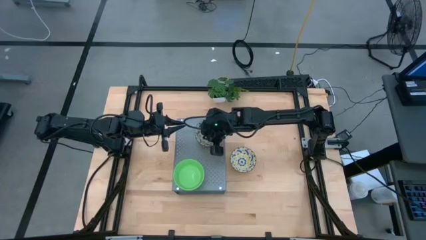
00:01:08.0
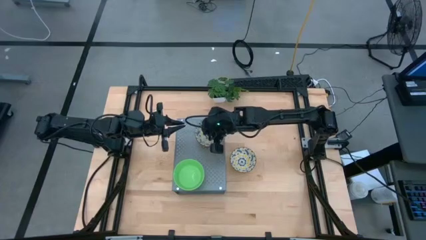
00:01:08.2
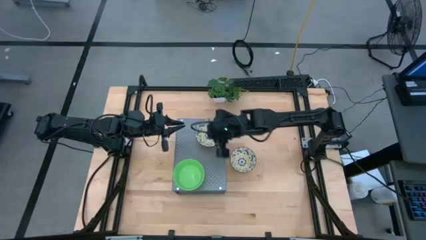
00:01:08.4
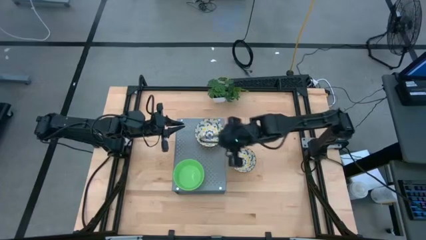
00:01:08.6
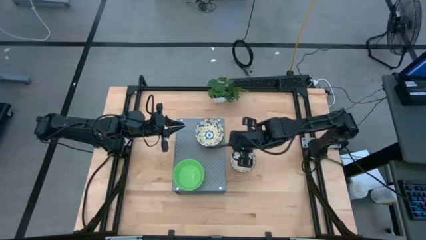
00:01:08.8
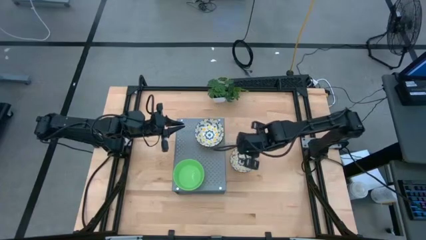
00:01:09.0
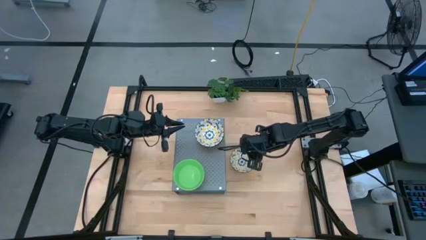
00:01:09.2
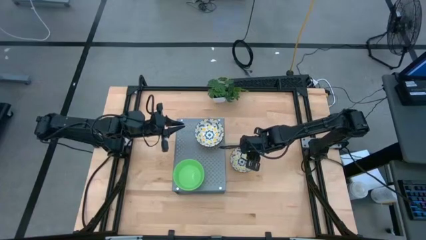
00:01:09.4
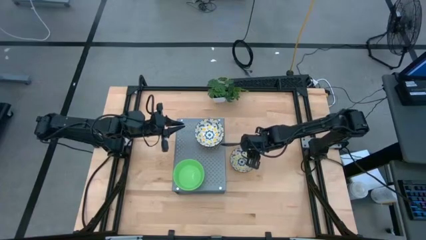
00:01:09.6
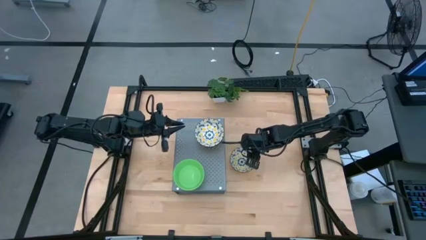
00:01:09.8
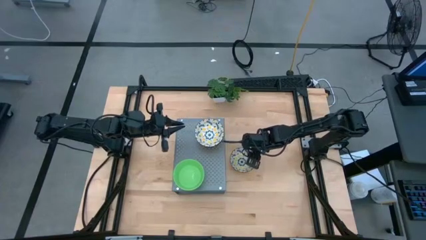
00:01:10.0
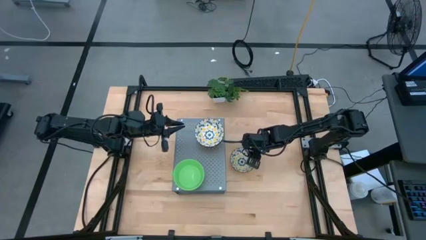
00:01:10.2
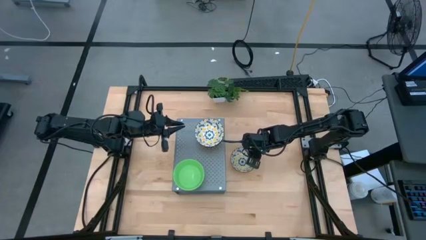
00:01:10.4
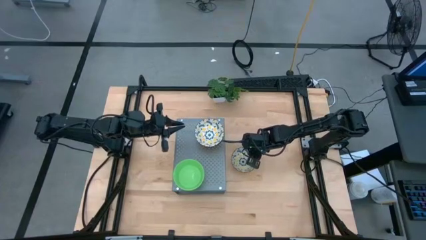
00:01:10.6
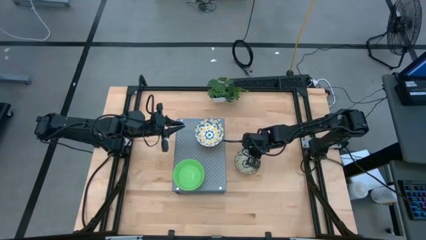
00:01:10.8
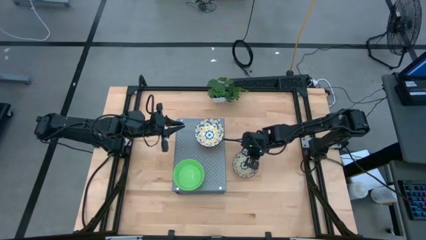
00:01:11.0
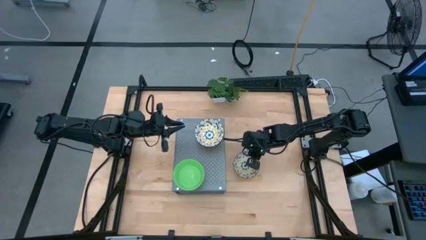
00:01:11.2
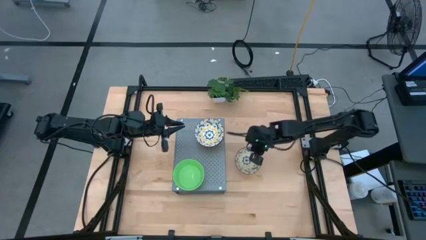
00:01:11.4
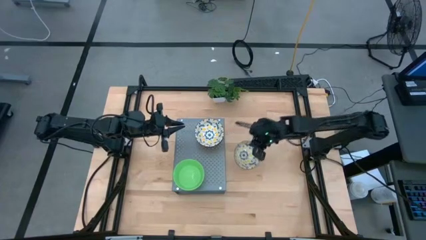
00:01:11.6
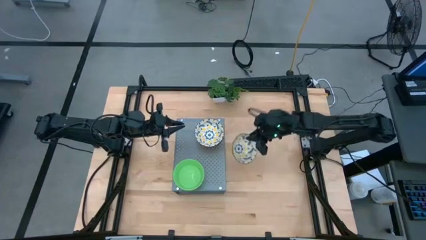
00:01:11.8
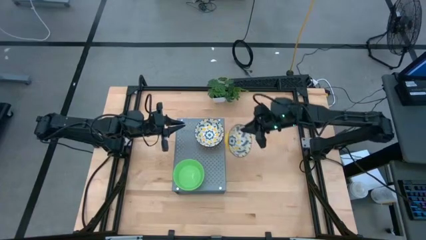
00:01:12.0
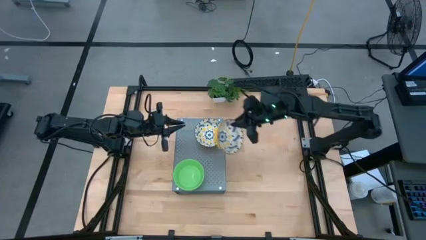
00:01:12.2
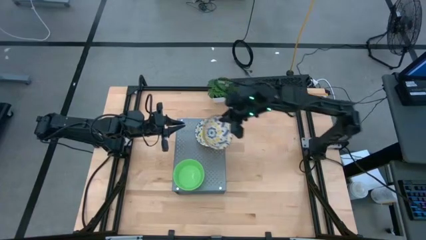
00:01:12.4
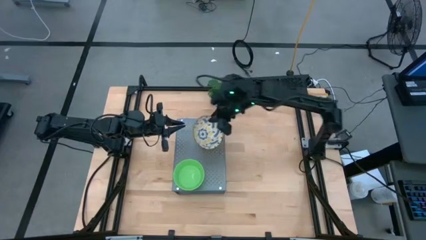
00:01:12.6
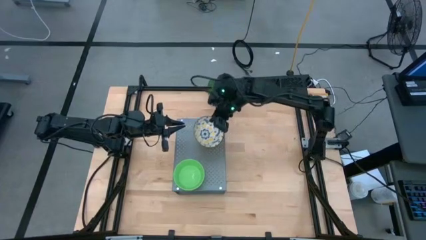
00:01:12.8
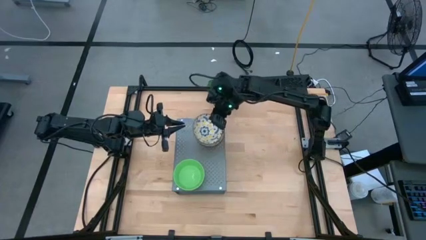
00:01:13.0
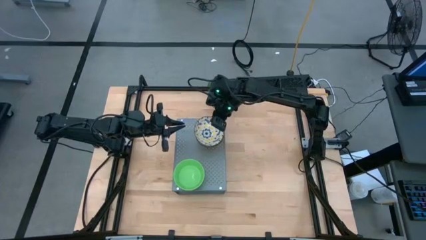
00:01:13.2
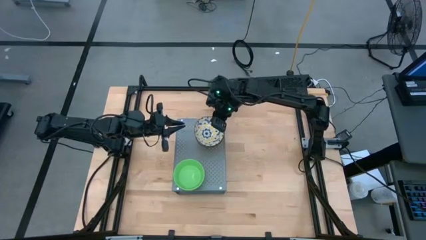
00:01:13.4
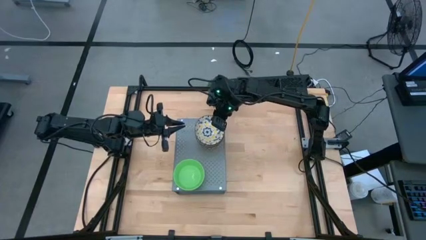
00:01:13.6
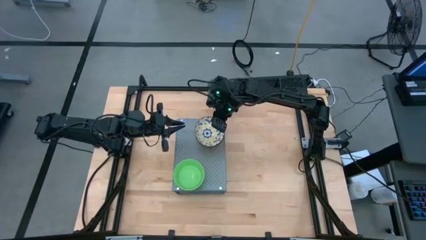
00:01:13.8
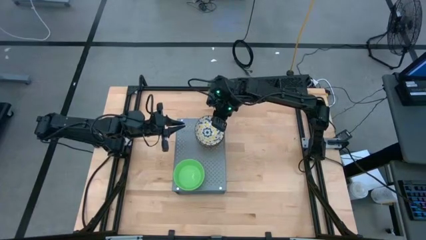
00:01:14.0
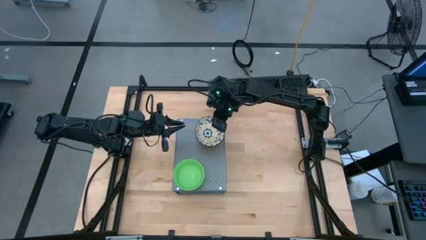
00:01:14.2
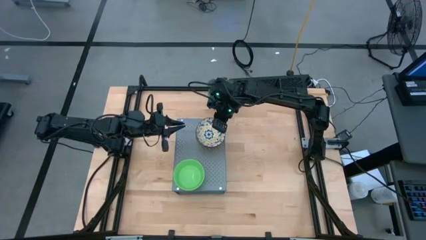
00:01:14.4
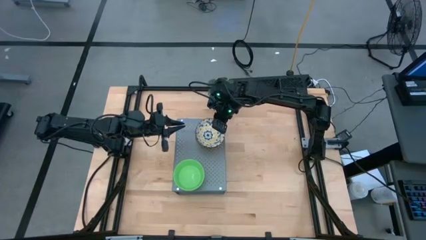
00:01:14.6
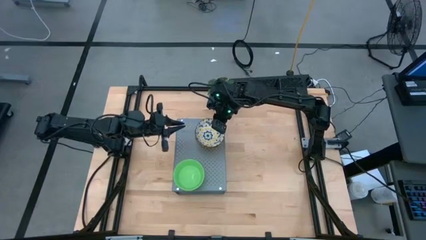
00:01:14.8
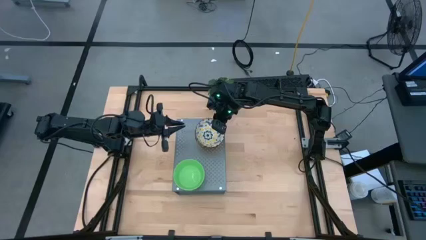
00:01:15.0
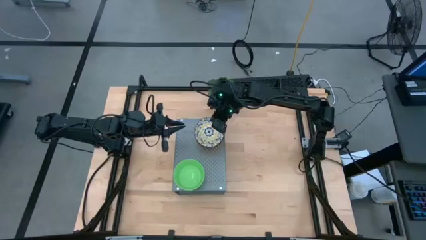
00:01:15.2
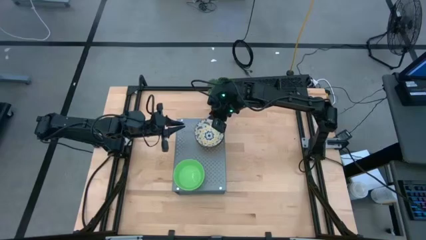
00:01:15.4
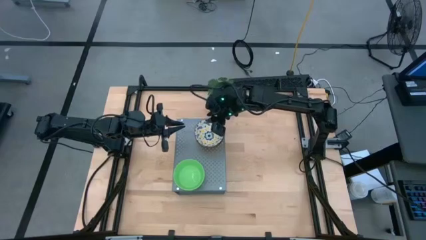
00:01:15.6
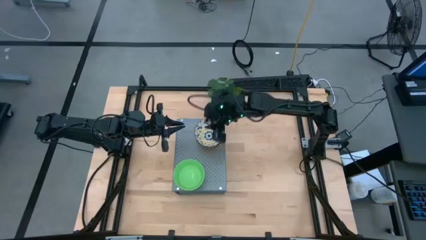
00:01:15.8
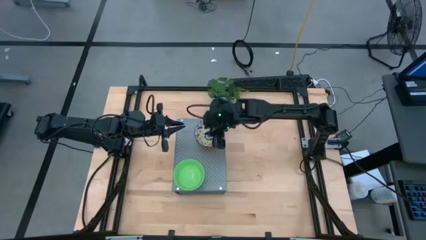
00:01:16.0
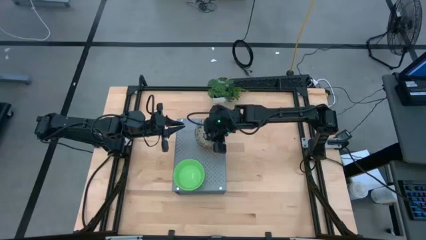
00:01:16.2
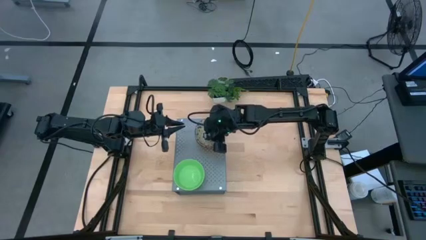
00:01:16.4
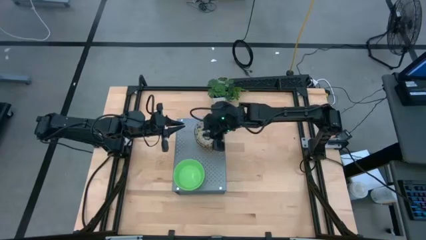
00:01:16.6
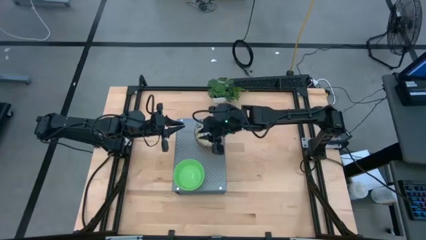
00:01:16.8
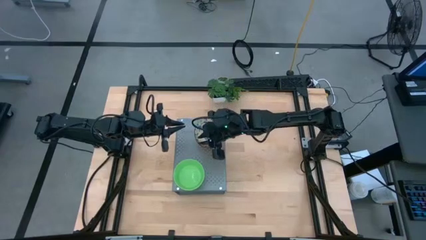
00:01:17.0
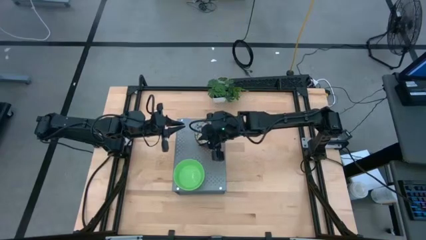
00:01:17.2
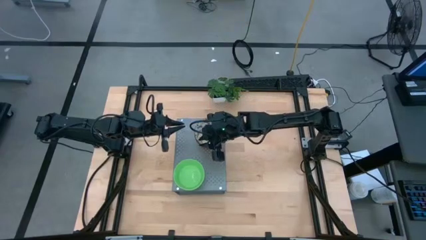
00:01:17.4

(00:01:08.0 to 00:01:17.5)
Task: Pick & Place Mini bowls
Stack the white patterned bowl on the white patterned bowls on the shelf

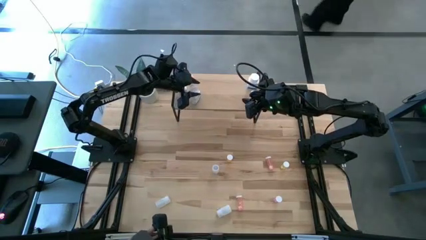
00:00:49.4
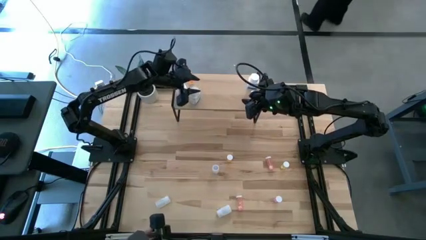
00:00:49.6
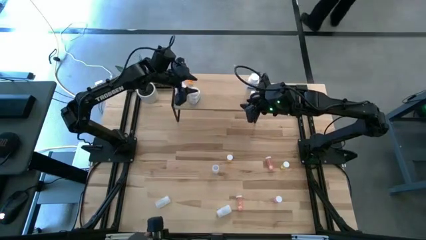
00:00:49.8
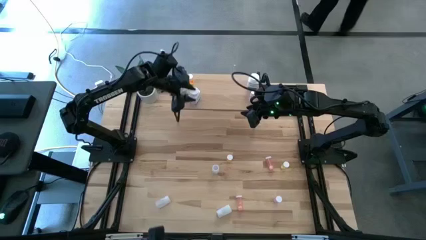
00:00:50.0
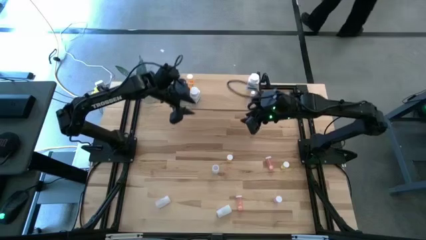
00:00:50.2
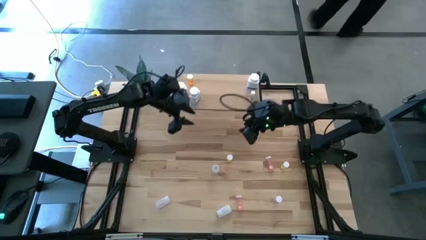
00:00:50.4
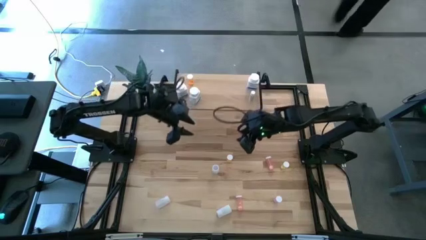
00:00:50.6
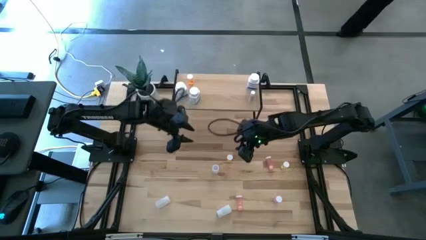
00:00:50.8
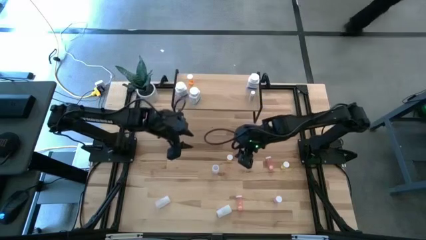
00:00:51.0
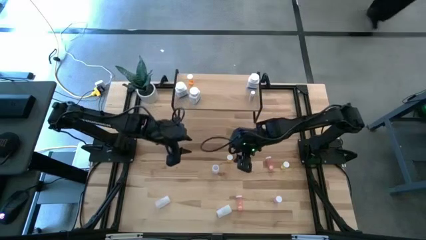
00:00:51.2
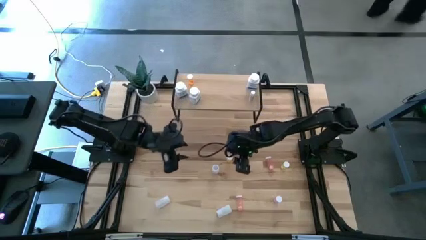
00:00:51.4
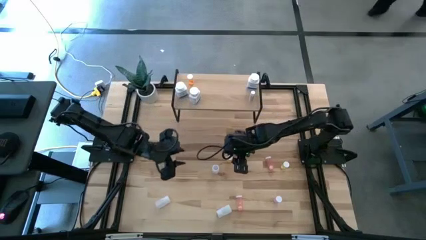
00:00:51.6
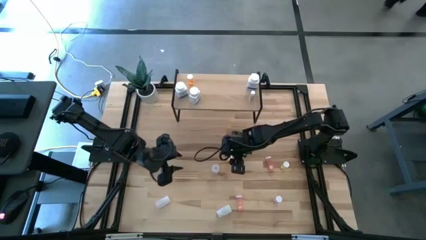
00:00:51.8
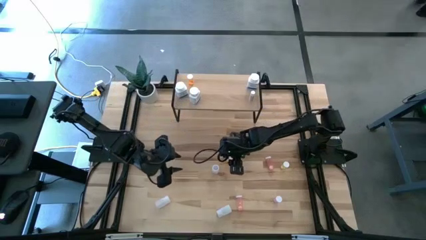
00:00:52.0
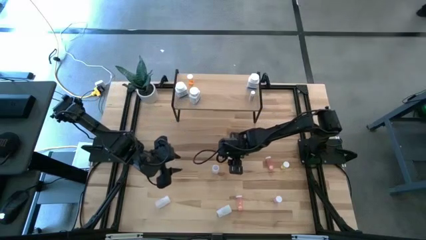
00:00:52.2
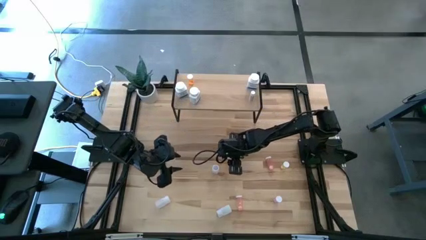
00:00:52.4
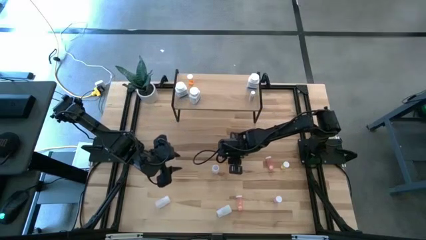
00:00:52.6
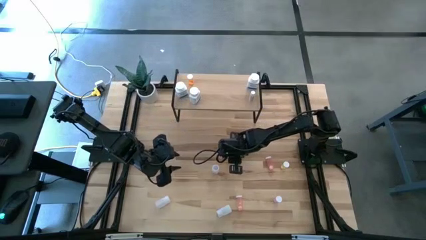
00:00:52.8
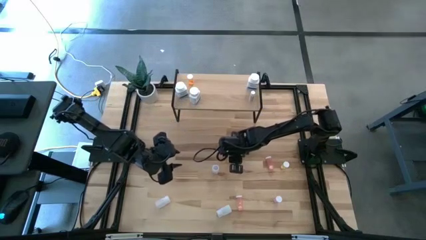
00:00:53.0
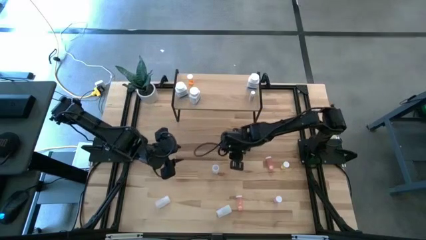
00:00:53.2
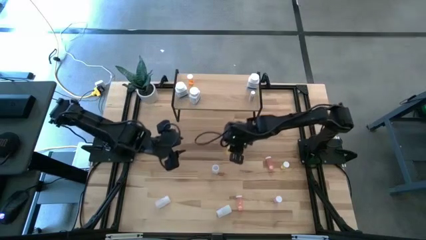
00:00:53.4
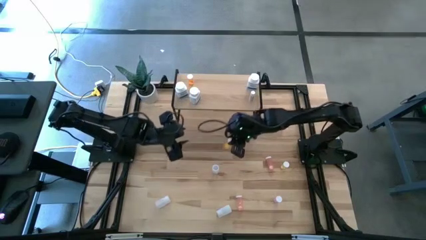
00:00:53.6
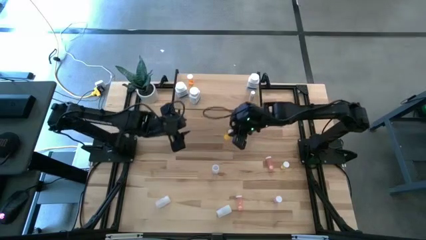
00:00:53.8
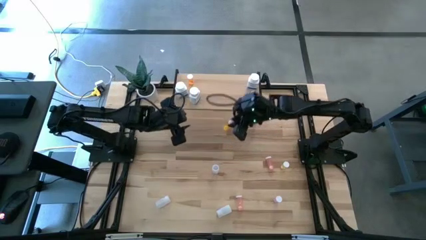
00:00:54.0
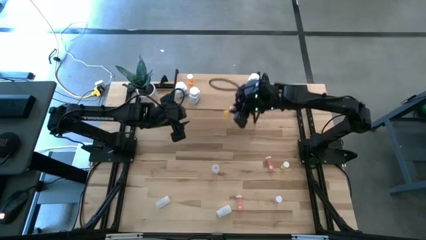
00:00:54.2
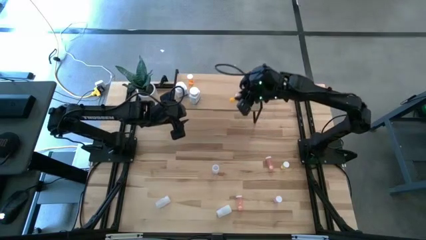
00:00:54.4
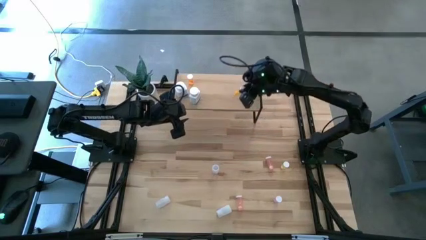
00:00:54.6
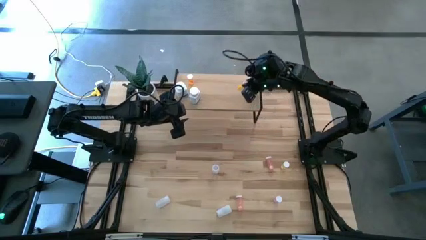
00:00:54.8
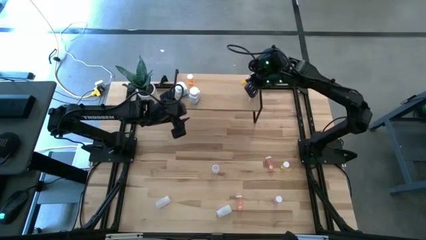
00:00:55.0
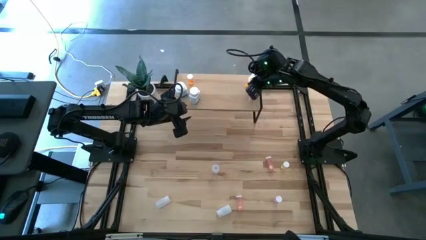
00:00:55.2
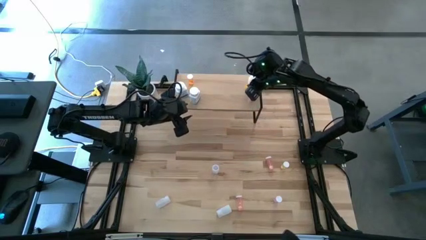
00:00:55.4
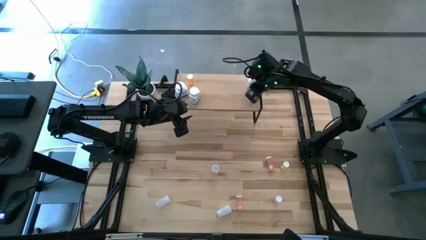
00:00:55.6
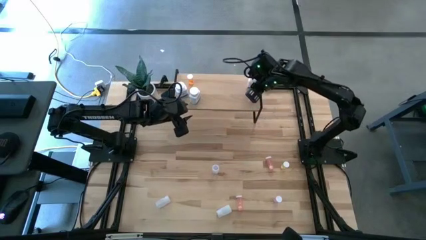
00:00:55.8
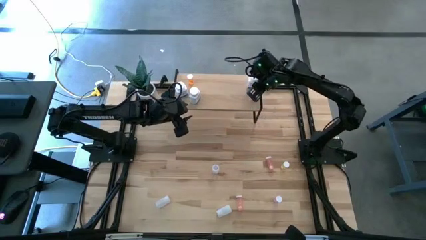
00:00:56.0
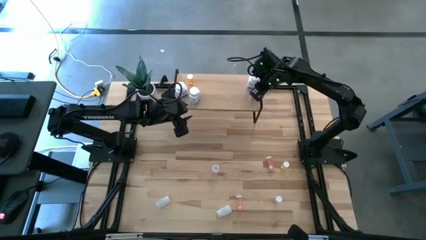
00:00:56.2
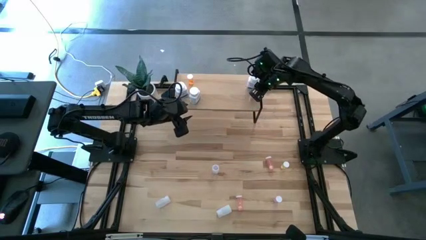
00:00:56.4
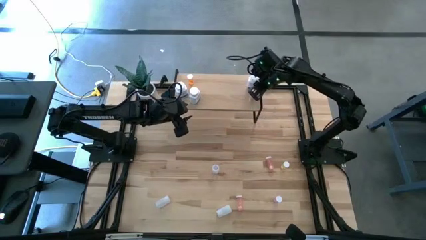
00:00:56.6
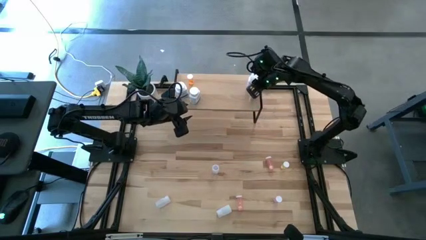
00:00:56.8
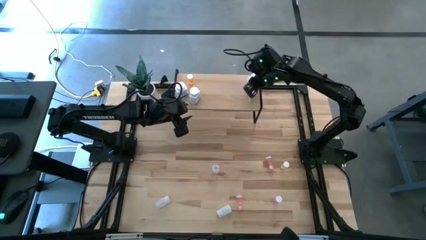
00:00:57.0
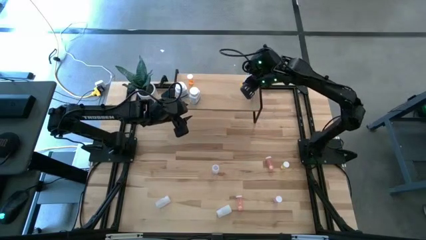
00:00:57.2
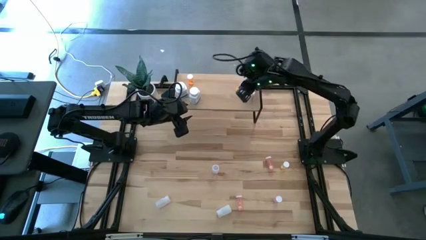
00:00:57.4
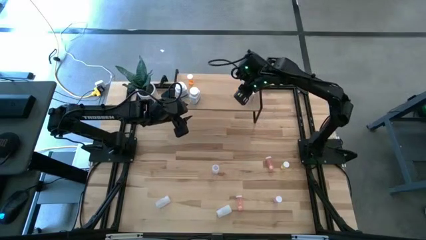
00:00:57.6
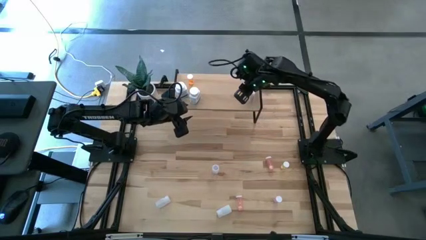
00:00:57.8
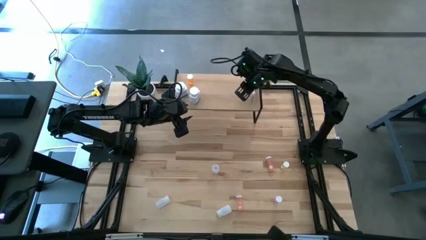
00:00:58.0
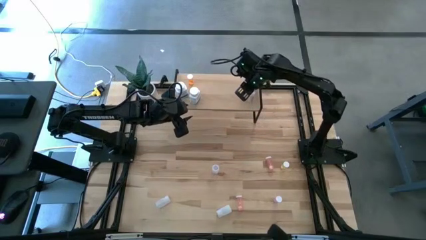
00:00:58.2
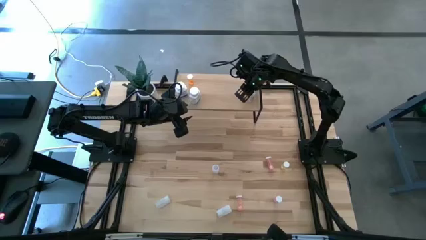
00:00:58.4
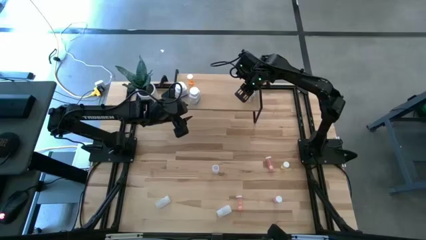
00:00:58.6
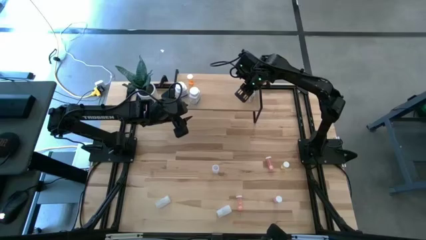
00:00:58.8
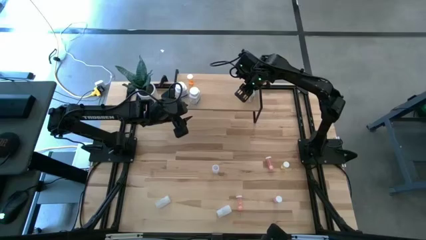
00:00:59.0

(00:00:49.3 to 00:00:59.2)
Task: Pick and place medicine bottles onto shelf by color
Put the middle orange pill bottle on the shelf
